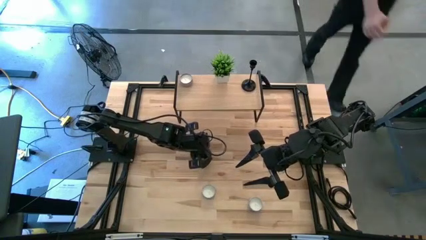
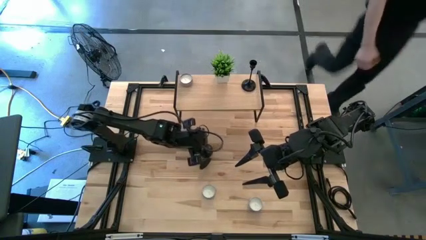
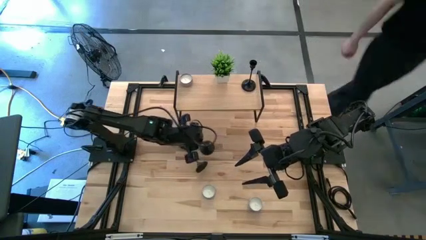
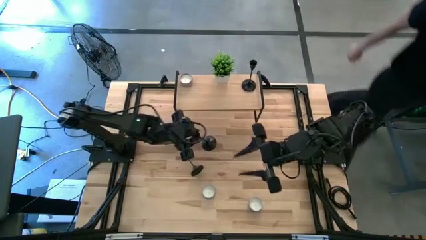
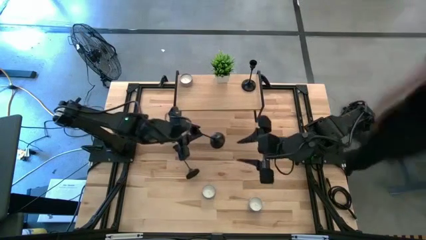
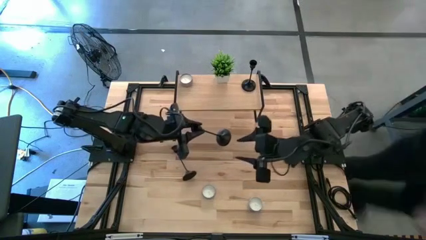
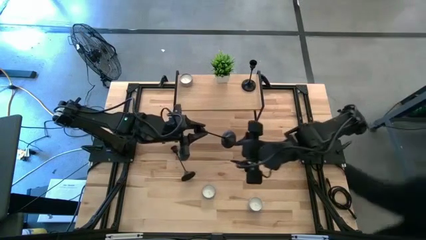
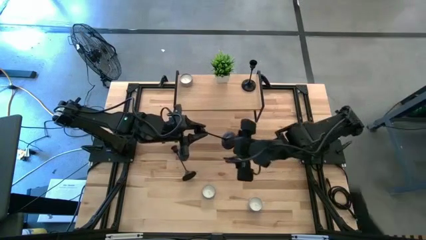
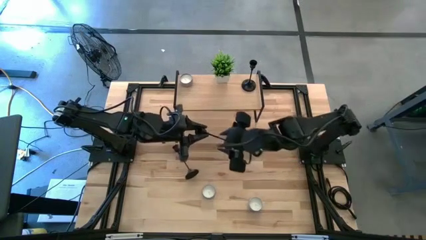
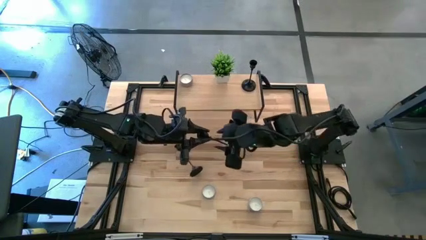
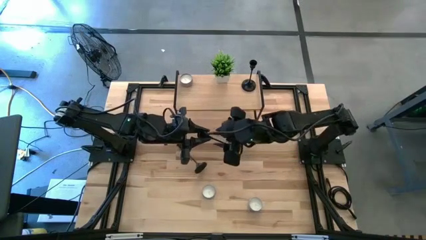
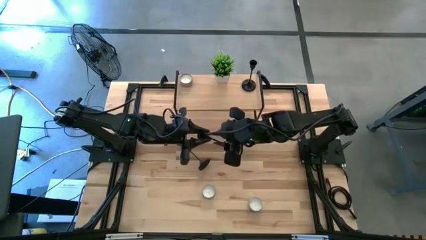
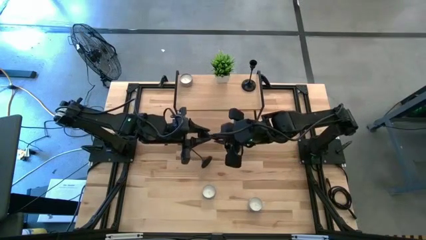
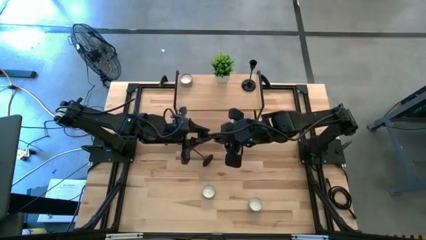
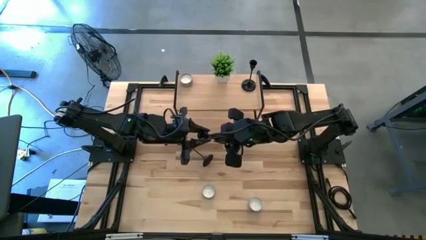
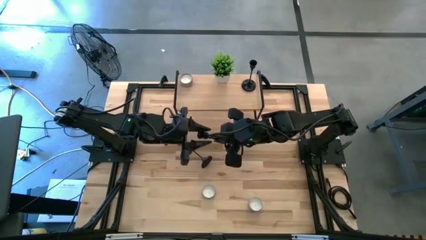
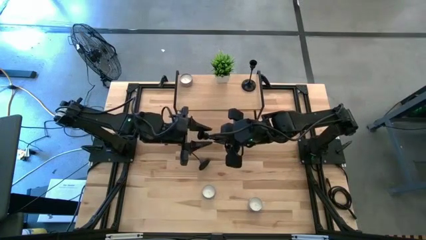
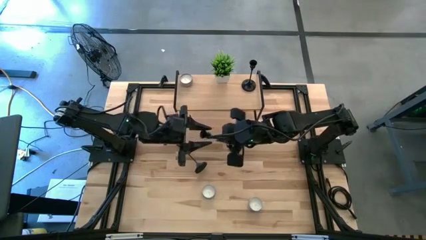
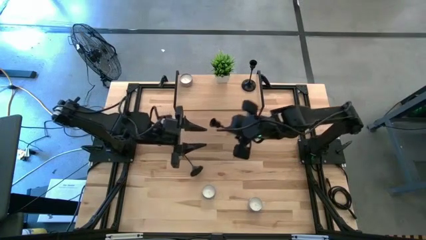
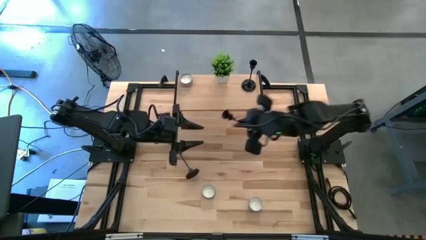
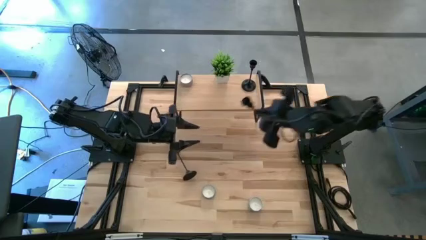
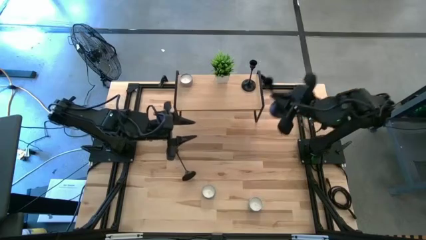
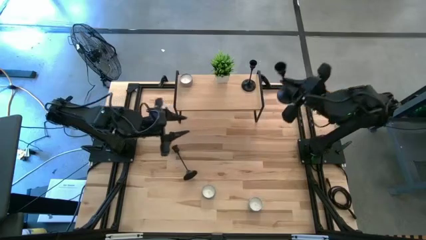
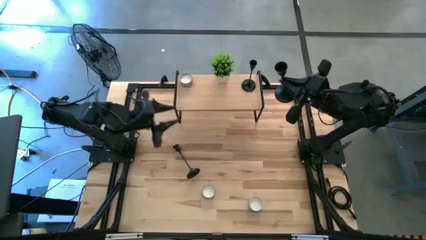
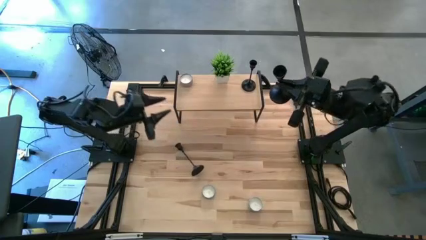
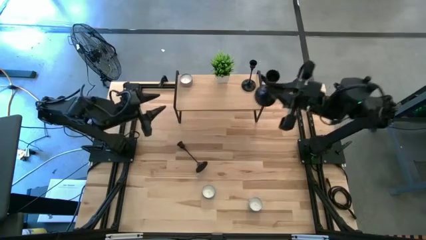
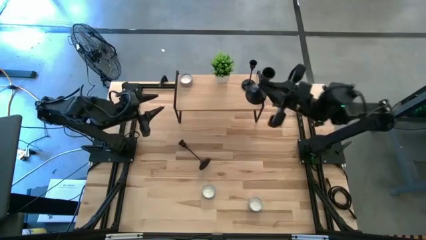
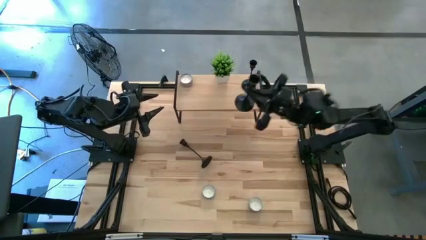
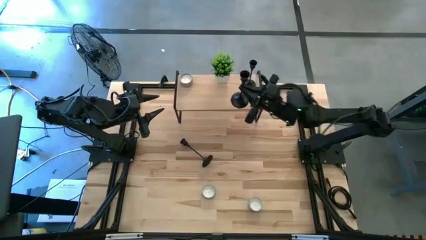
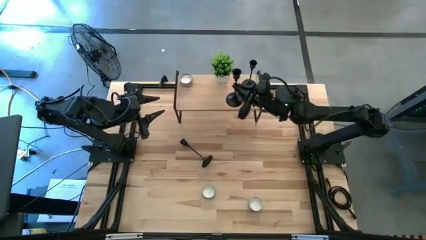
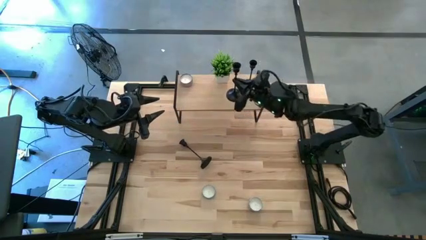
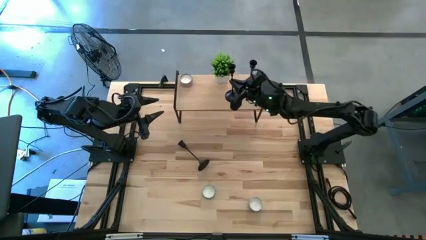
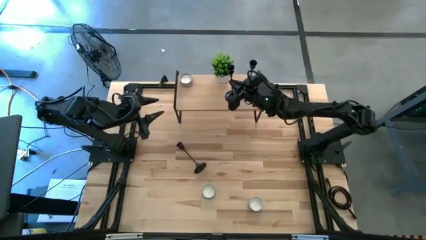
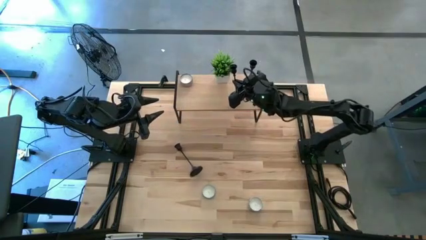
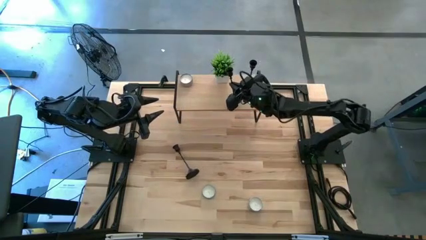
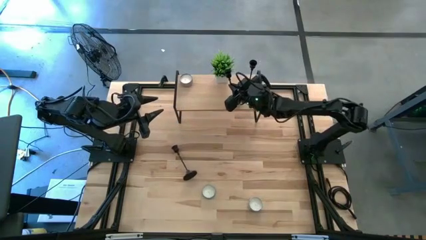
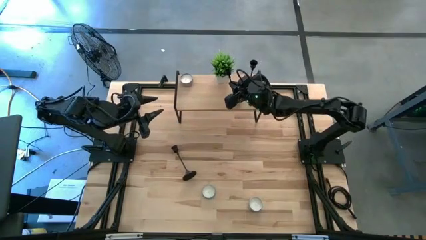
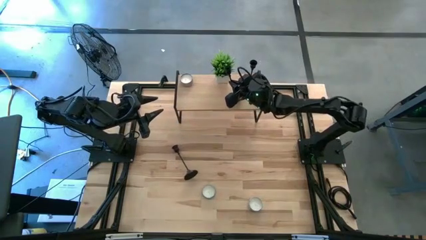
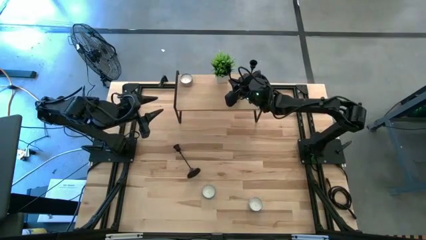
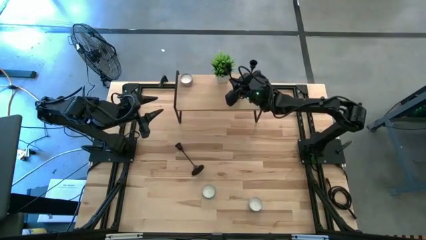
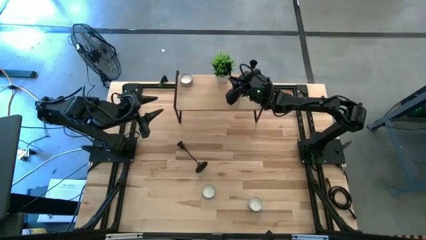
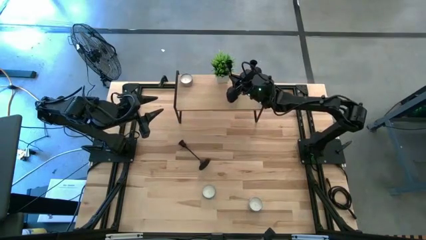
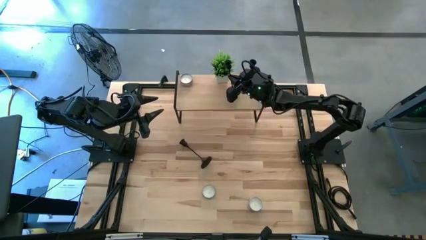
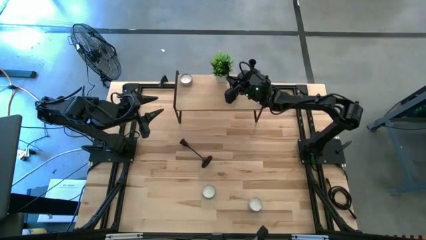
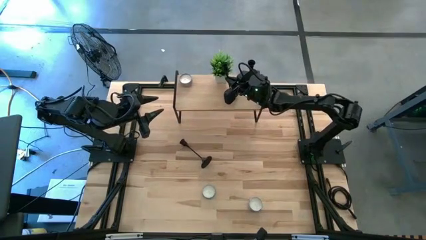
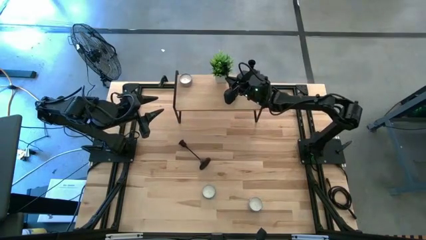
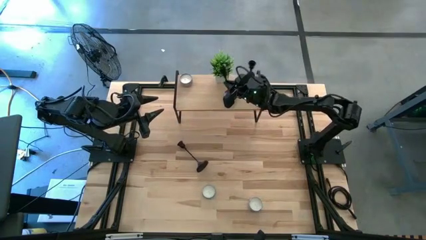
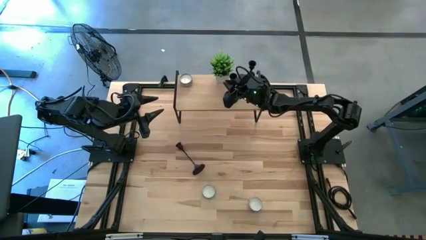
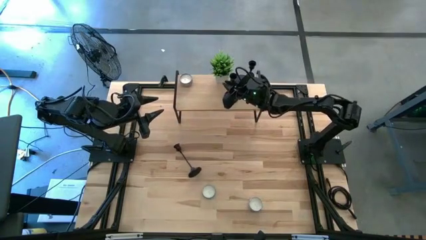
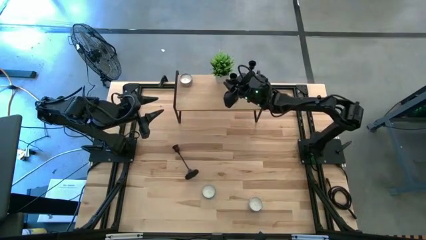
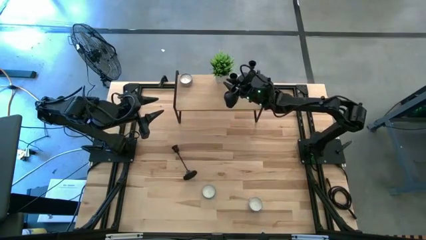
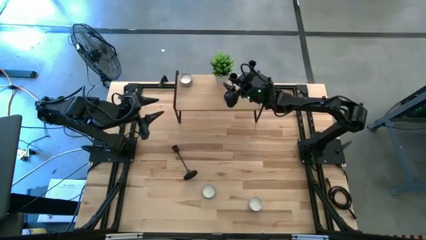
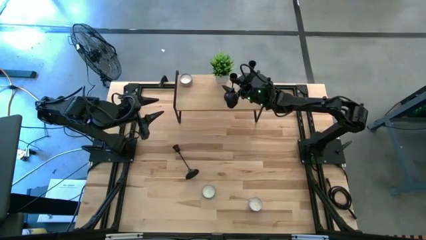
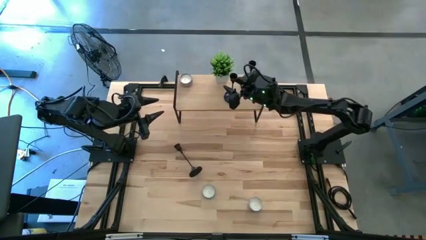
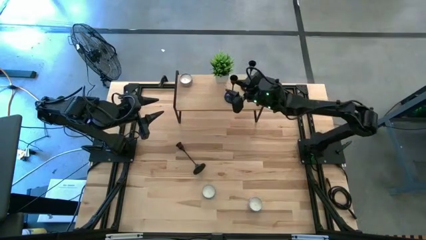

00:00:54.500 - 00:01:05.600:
Task: Pick & Place candle stick holders
Put the right black candle holder on the shelf aligned with the other black candle holder

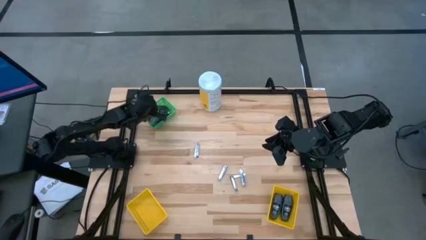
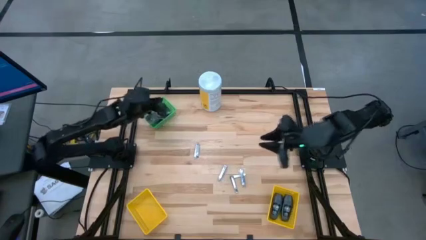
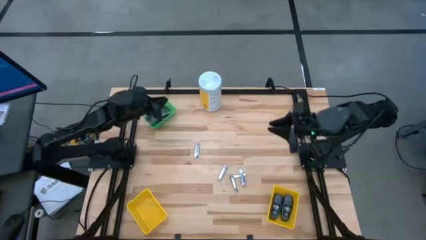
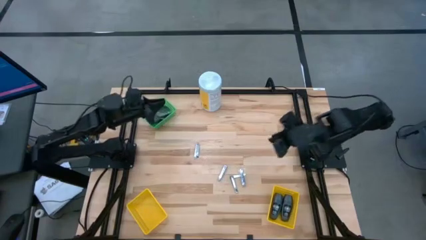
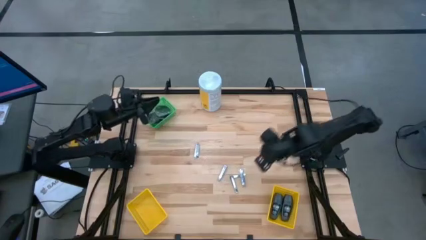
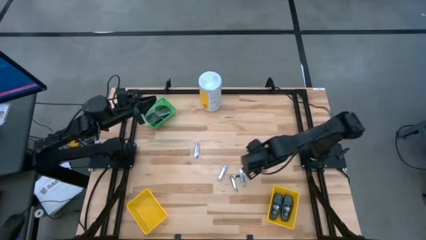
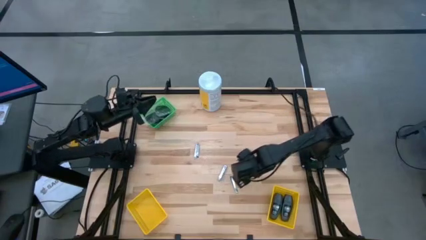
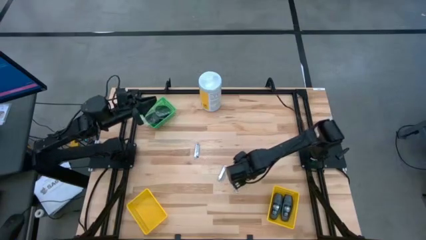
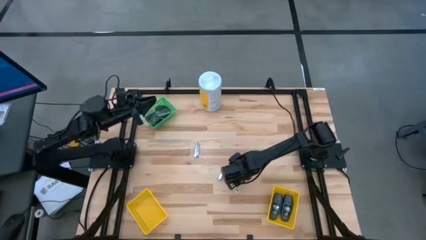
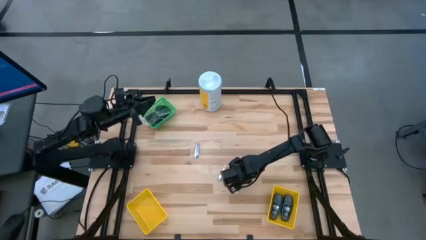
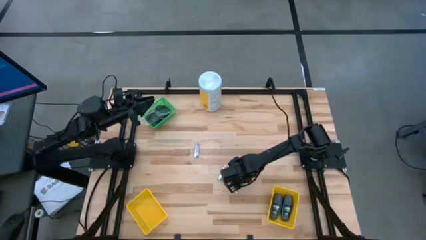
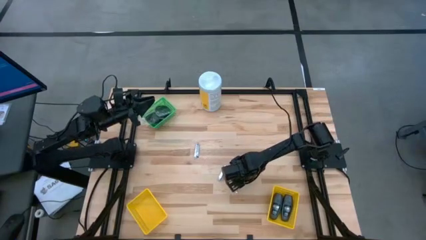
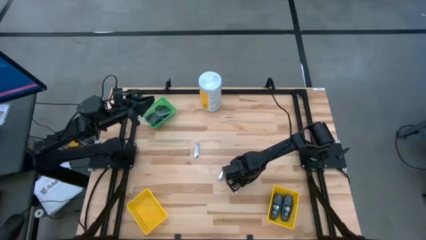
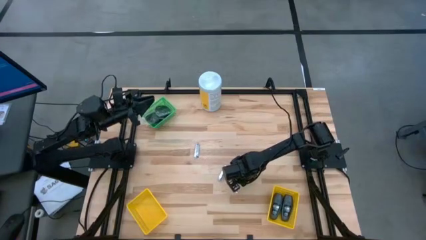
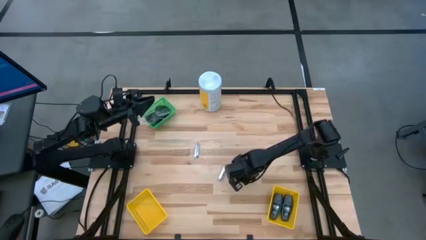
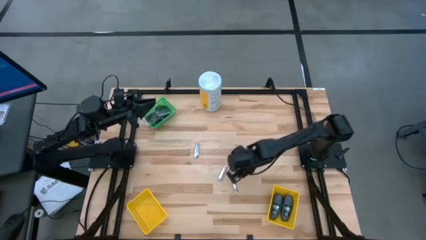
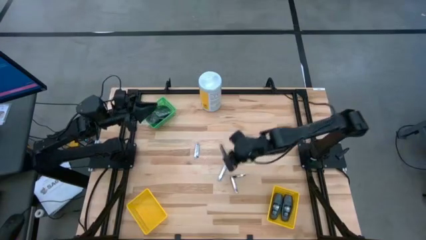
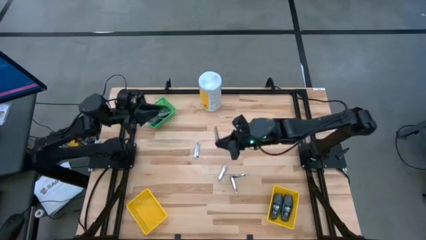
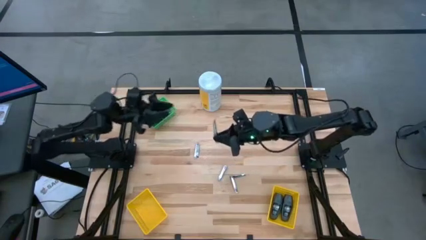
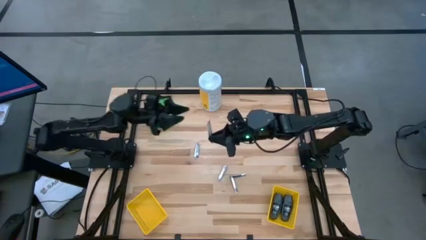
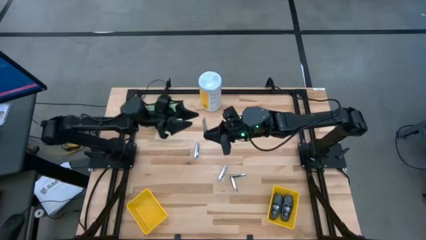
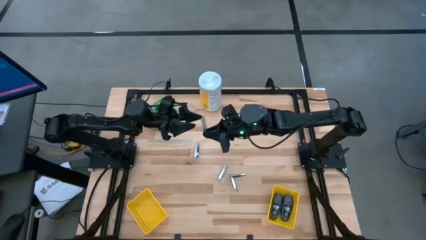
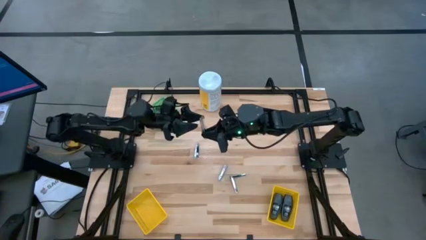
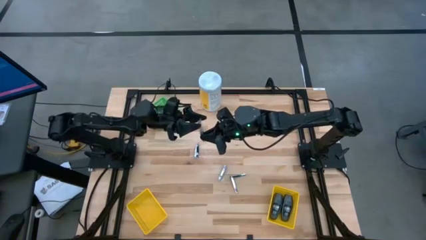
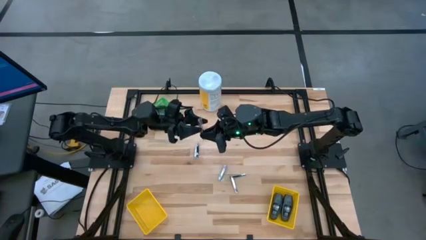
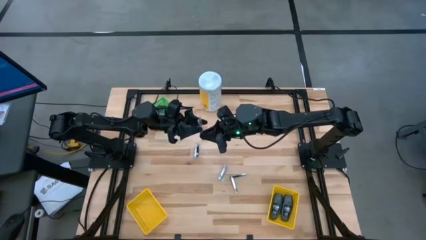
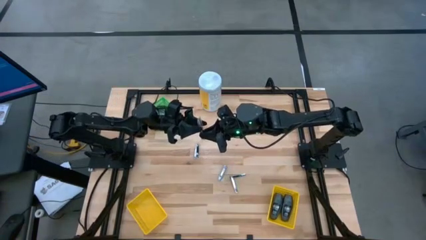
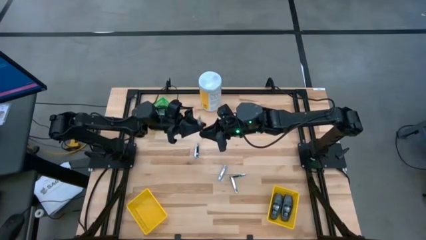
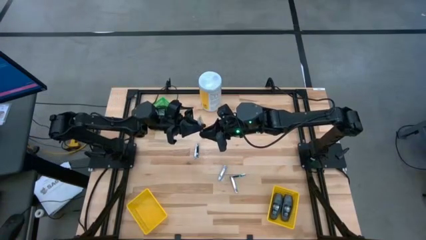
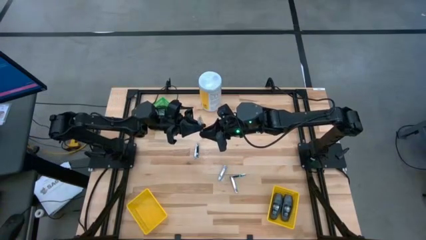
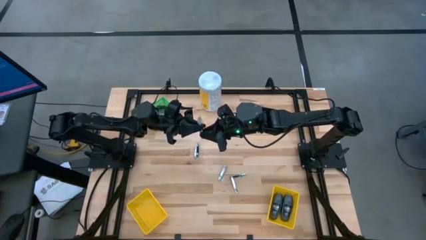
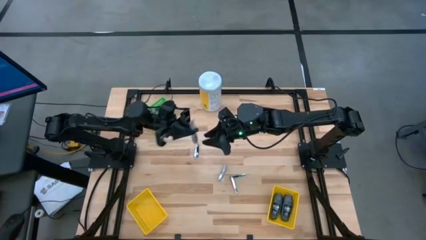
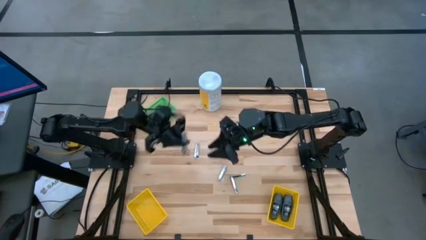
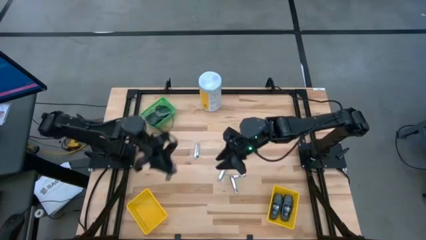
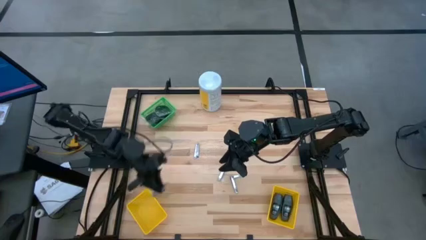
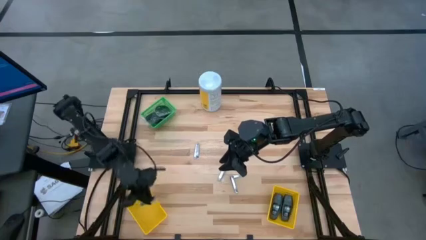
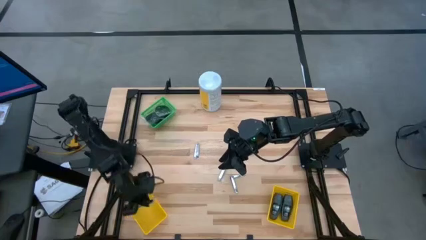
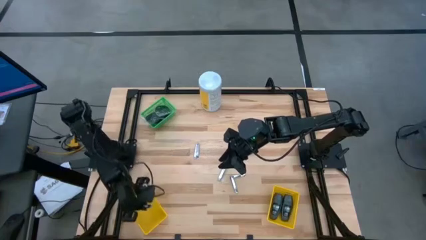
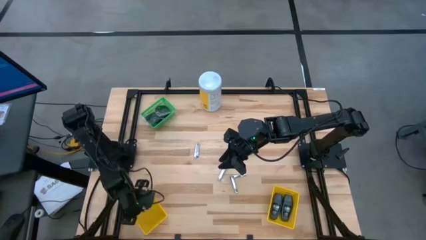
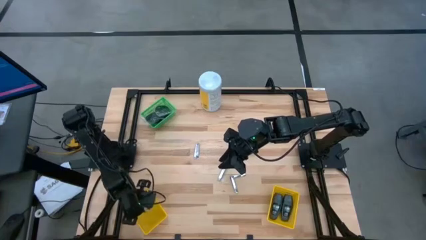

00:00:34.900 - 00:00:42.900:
Task: Pick & Place Travel size toiletries
Put the nail cutter into the left yellow bin
